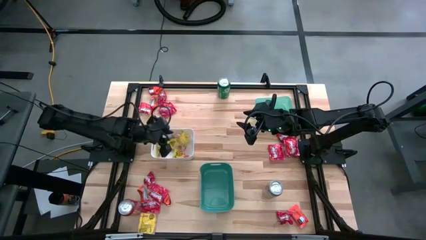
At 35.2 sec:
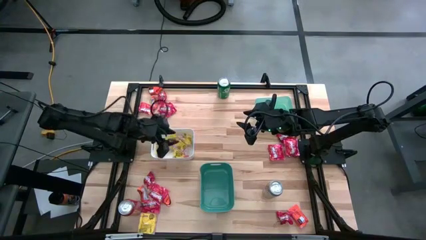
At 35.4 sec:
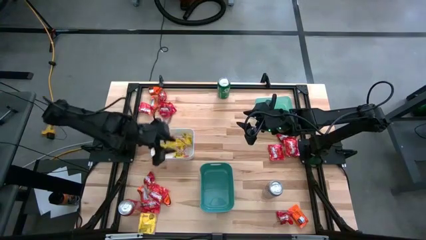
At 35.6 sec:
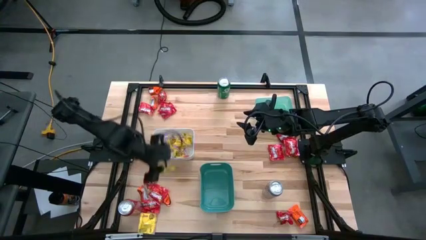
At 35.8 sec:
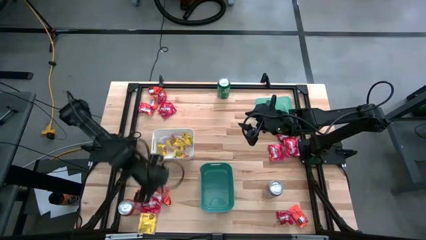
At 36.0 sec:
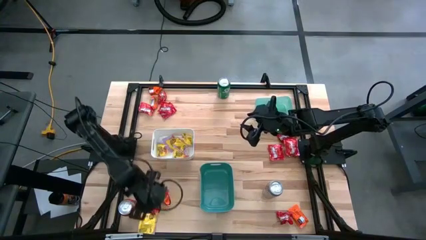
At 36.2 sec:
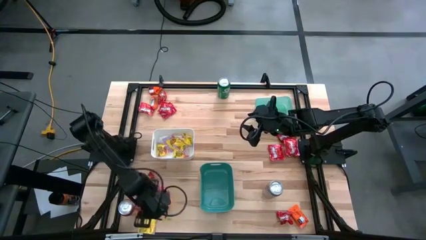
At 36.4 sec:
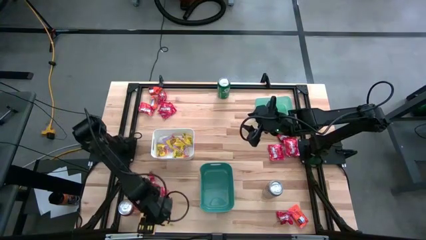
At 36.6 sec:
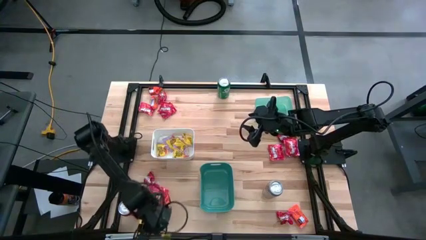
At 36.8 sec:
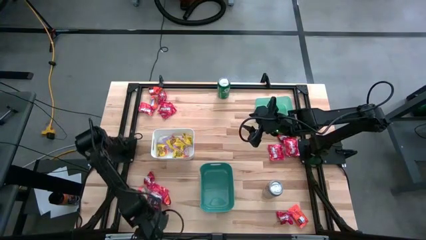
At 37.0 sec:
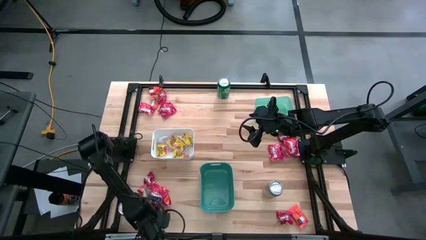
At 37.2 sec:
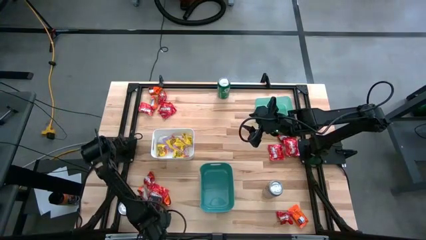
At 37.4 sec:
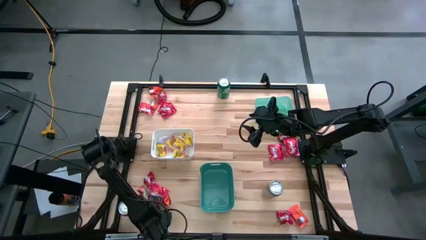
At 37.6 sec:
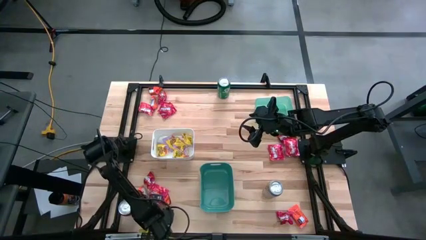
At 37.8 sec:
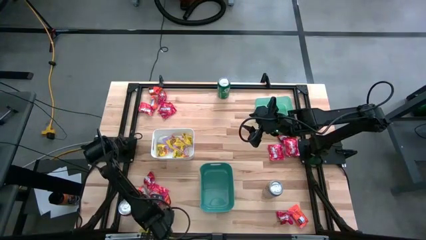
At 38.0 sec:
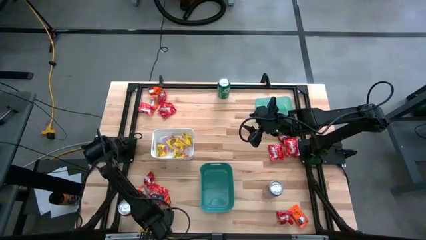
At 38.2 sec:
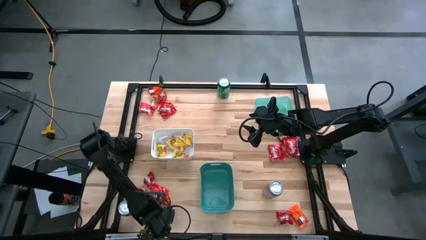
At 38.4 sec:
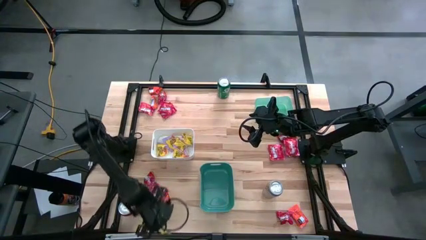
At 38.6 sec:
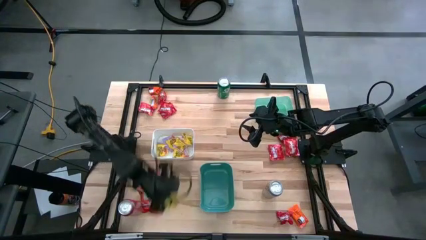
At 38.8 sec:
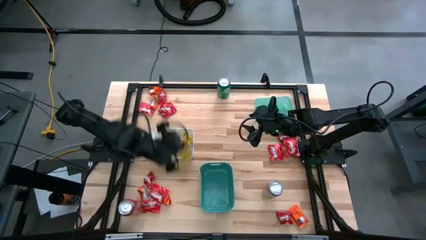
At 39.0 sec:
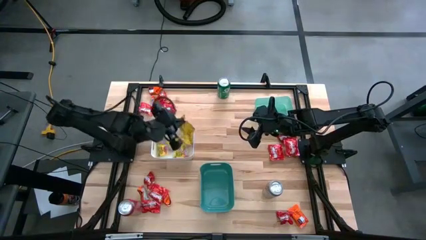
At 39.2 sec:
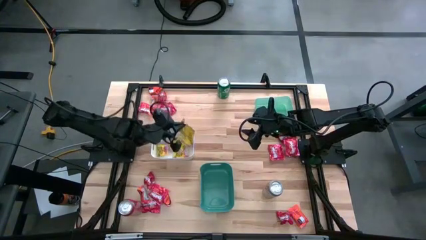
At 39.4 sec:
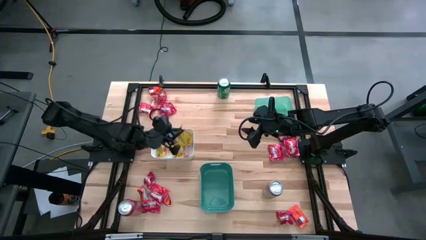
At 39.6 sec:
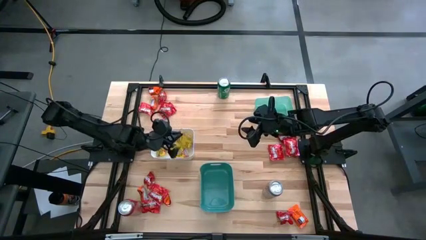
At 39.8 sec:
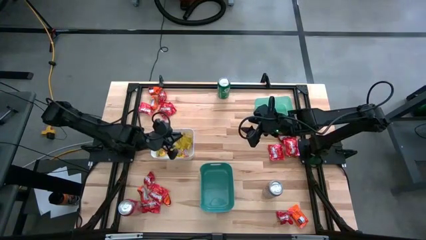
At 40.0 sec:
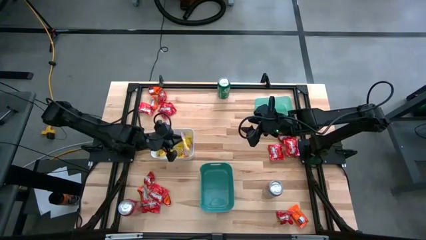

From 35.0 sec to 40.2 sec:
Task: Sort candy
Put the yellow candy pack into the white bin

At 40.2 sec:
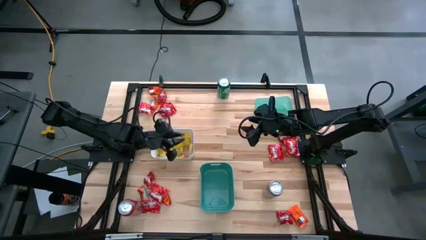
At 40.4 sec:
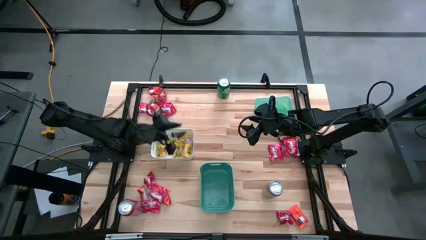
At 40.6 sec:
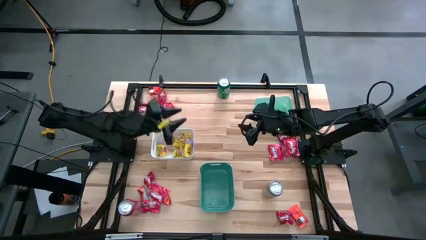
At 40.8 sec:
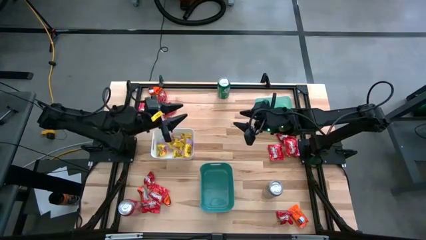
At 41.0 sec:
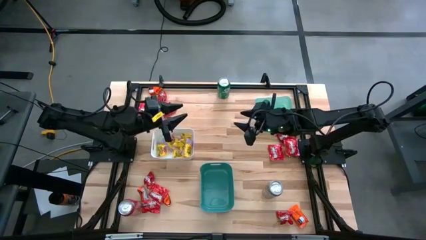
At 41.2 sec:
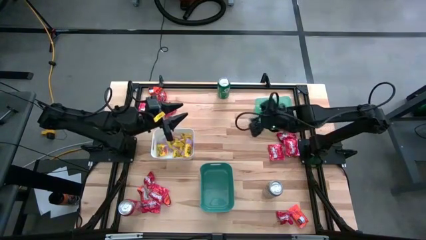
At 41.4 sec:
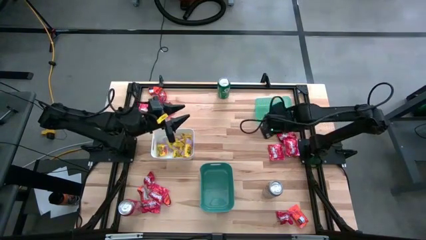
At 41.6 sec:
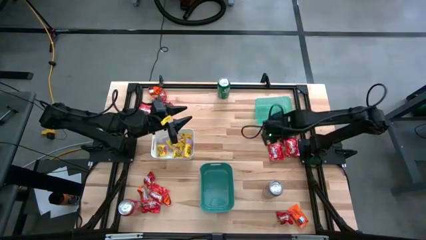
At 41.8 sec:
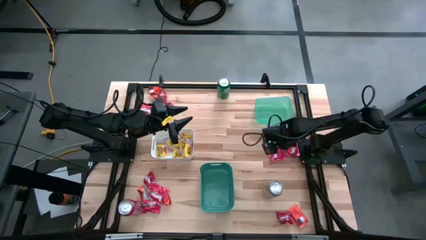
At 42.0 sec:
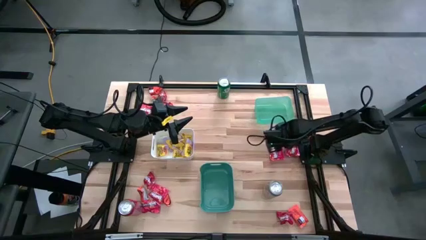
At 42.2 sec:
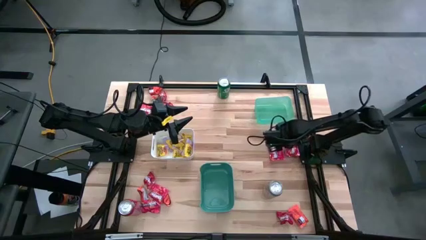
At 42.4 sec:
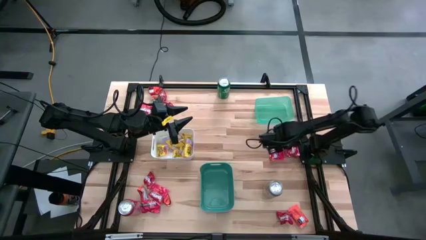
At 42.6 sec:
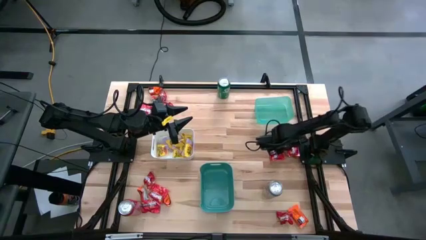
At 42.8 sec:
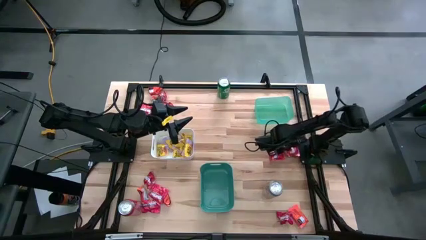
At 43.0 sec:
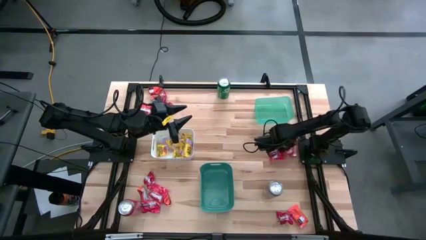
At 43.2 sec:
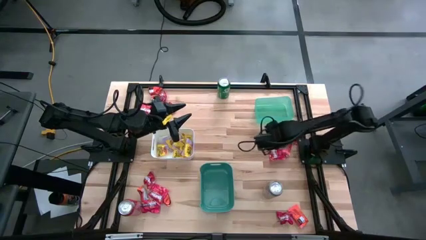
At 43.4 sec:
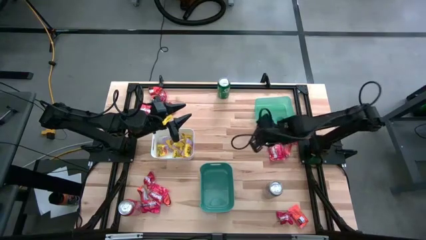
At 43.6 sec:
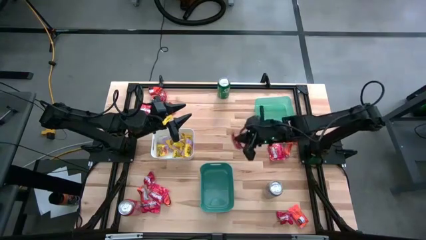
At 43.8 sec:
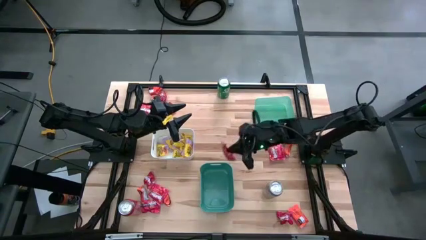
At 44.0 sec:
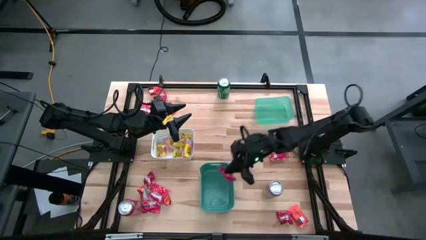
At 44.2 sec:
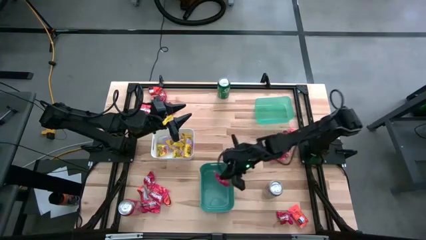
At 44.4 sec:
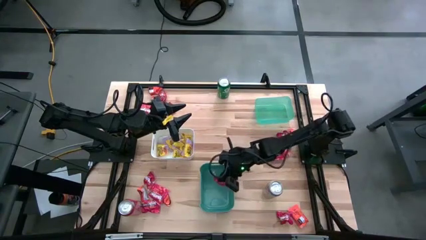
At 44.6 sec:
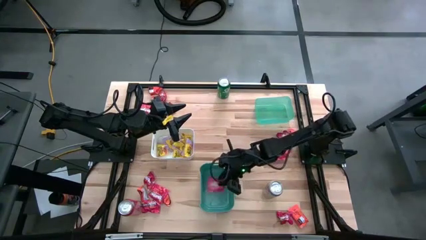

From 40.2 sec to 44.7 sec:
Put the red candy pack into the green bin

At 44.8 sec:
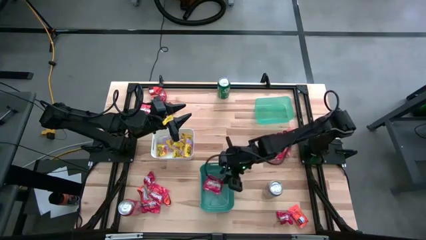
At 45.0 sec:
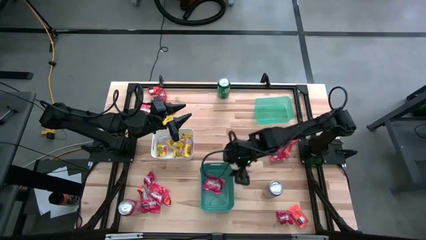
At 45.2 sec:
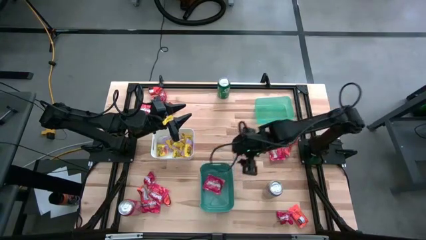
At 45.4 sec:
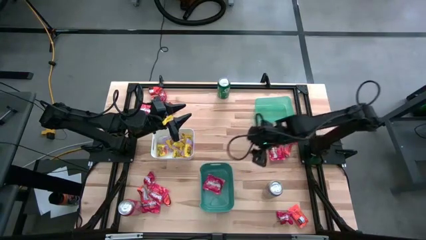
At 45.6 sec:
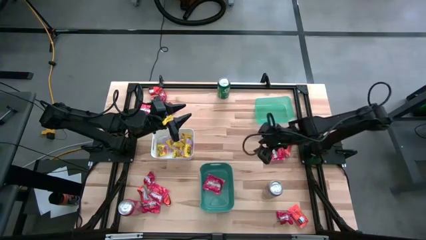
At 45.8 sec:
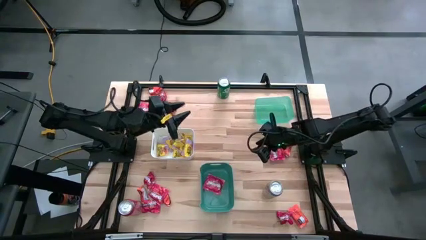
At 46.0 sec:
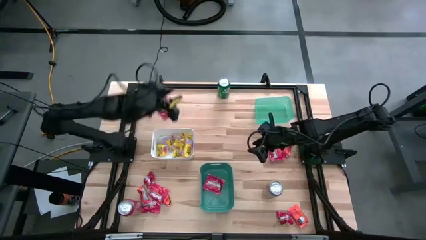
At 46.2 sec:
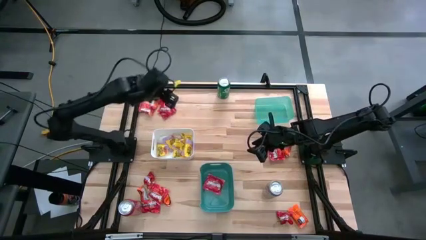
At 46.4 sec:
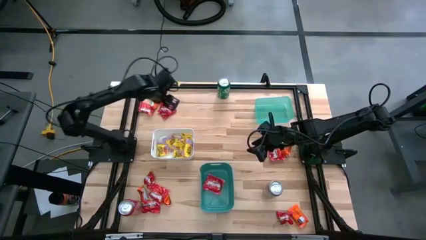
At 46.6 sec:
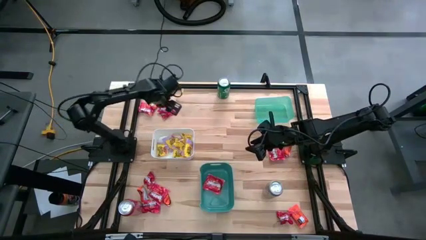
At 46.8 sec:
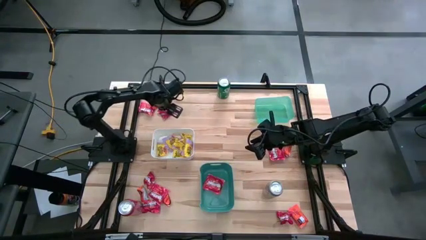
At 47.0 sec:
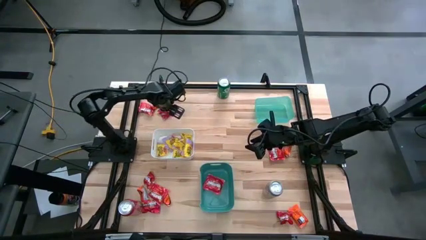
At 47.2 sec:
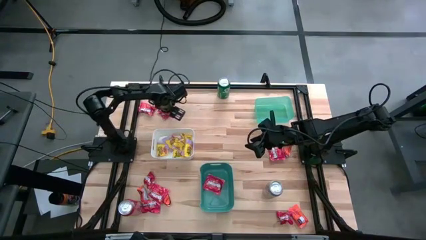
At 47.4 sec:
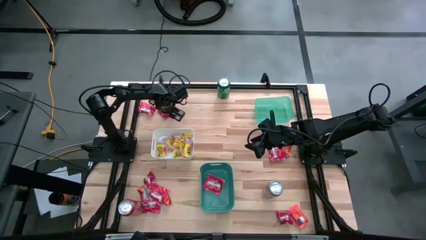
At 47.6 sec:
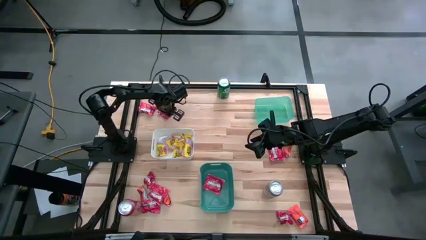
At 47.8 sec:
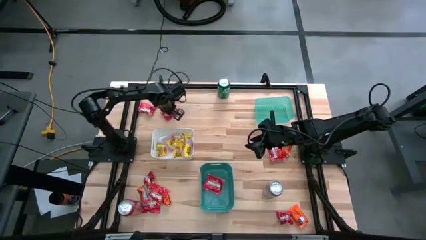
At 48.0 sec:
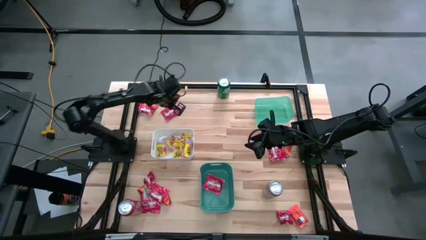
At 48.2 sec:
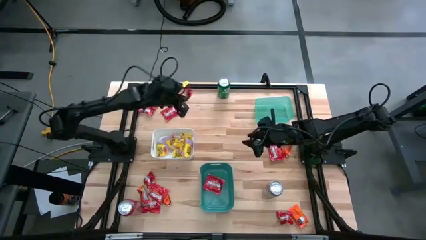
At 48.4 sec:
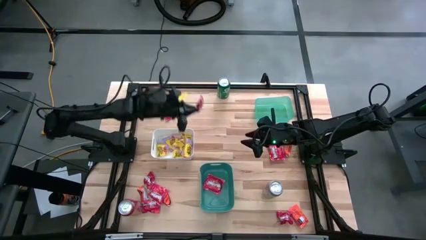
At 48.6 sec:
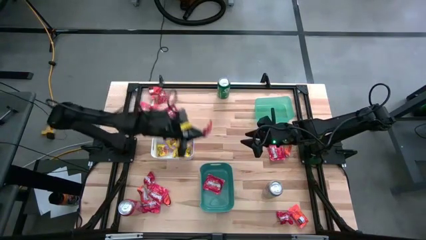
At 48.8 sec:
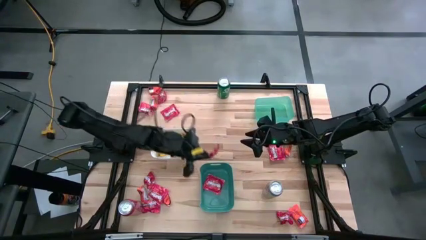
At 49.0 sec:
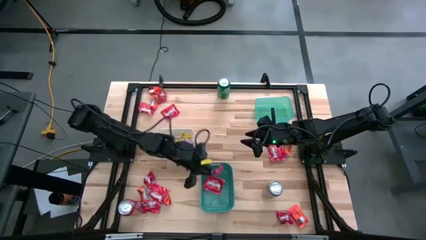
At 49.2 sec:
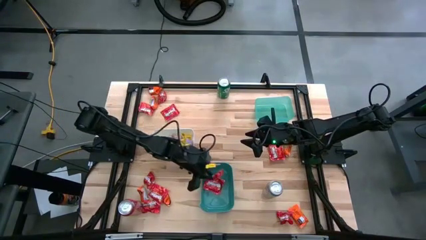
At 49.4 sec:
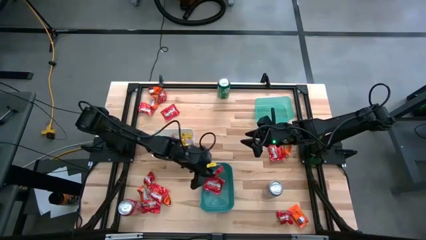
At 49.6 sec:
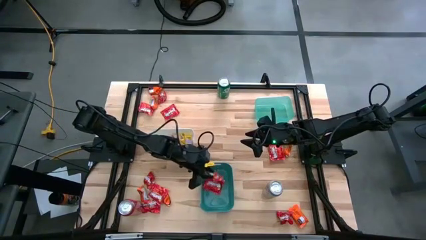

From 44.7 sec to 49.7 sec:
Put the red candy pack into the green bin
